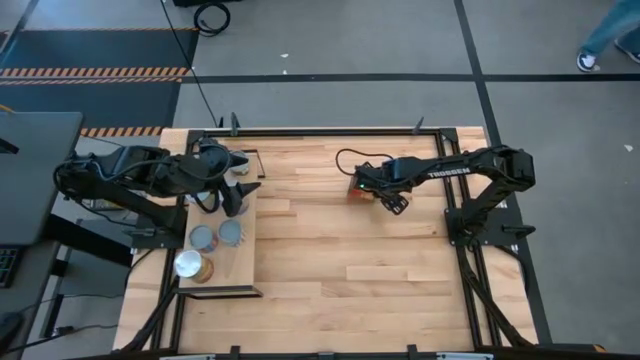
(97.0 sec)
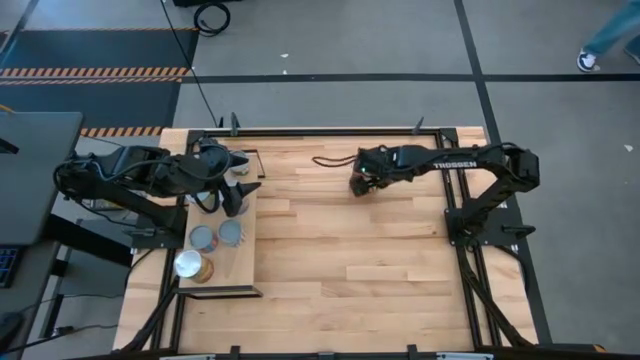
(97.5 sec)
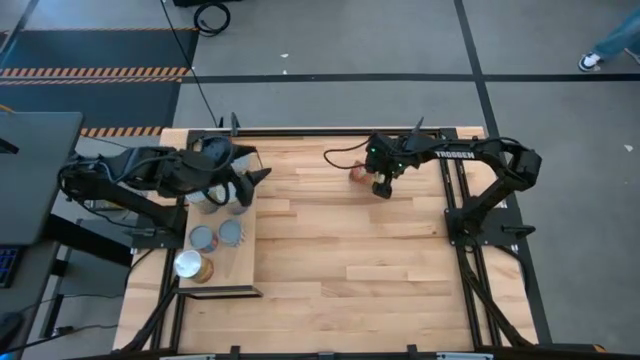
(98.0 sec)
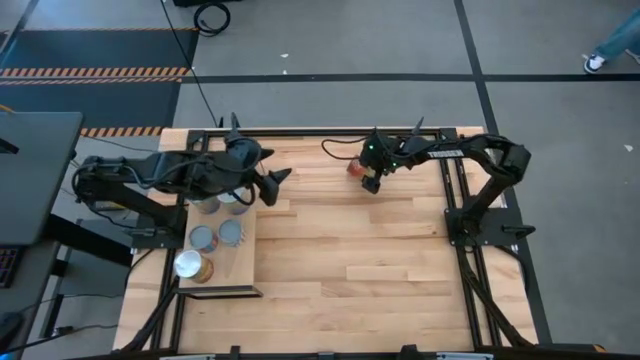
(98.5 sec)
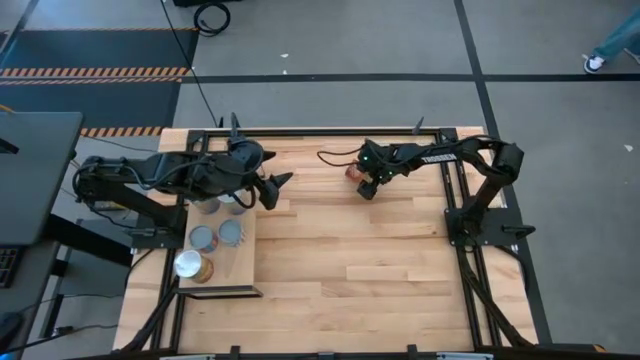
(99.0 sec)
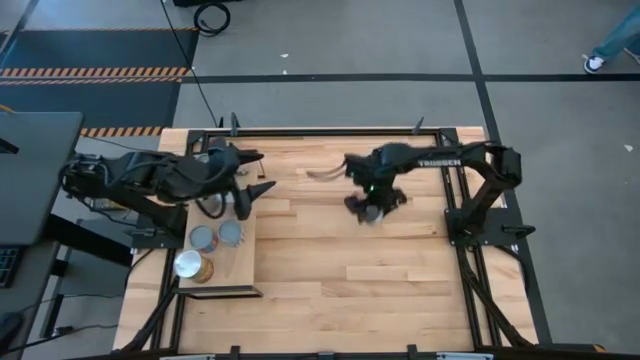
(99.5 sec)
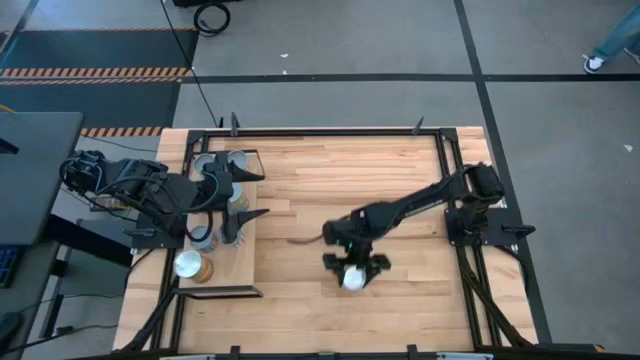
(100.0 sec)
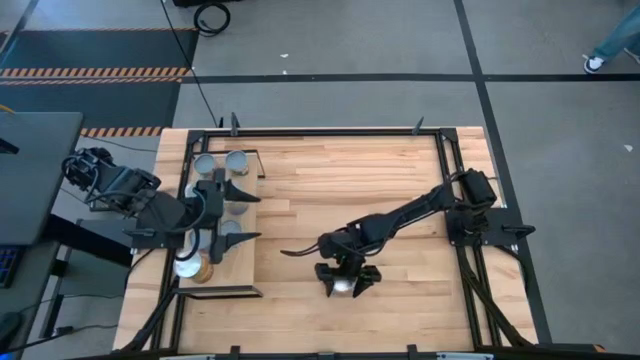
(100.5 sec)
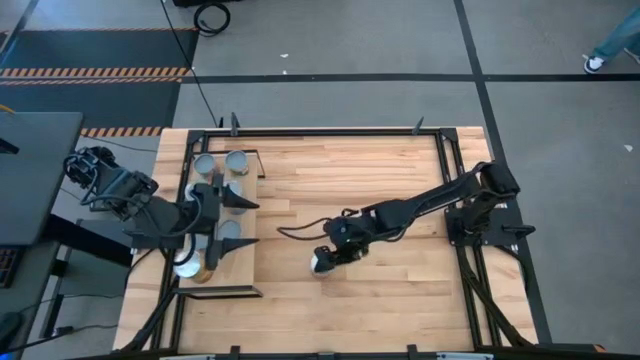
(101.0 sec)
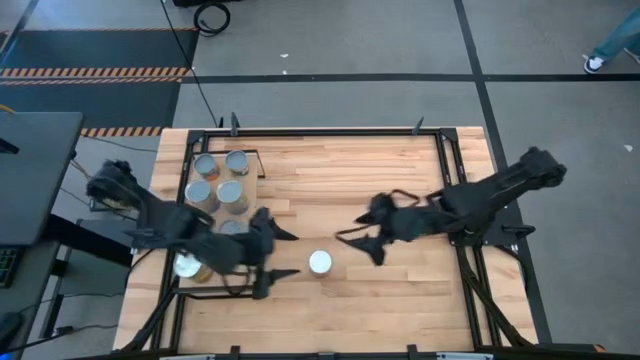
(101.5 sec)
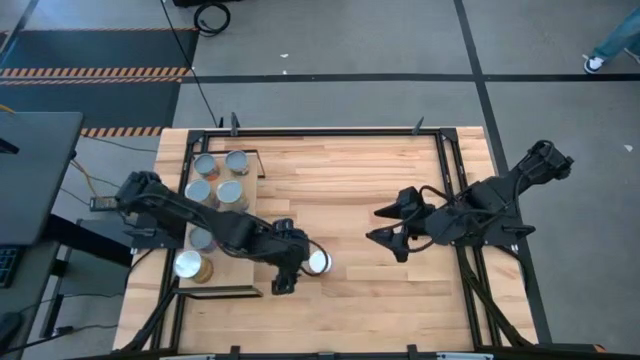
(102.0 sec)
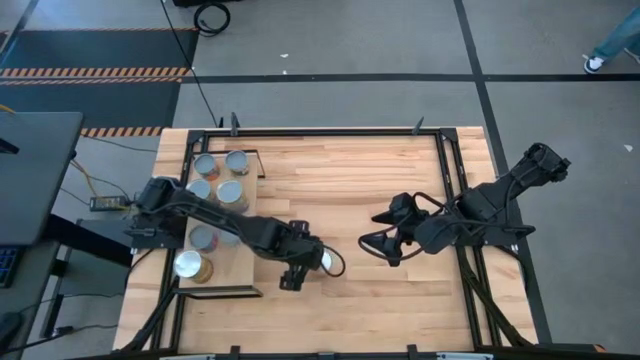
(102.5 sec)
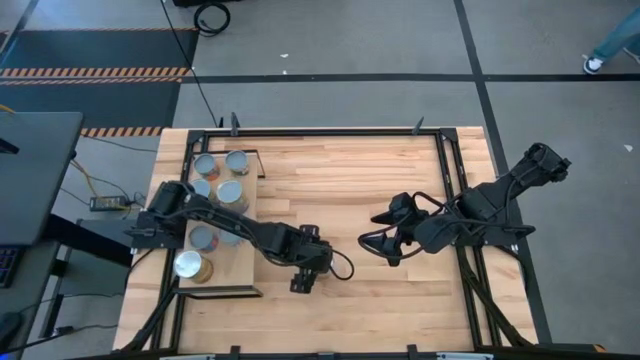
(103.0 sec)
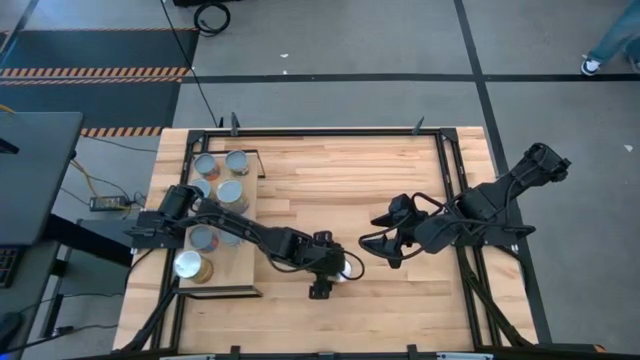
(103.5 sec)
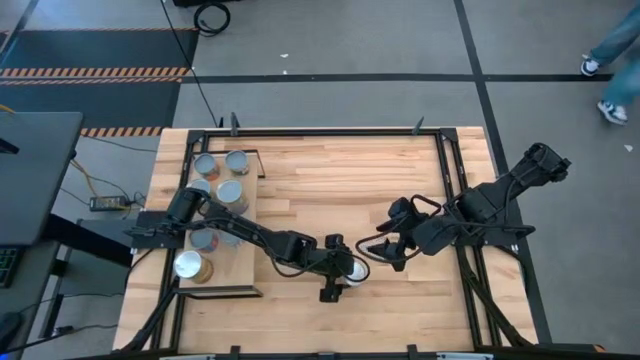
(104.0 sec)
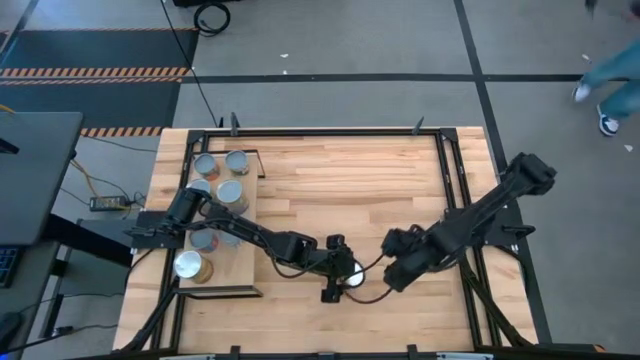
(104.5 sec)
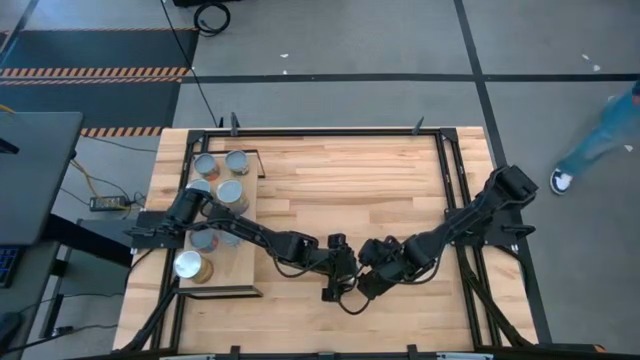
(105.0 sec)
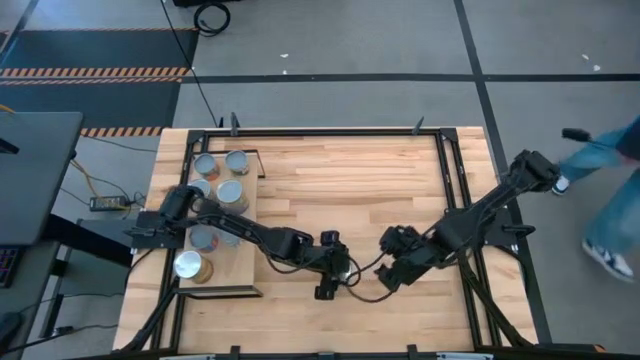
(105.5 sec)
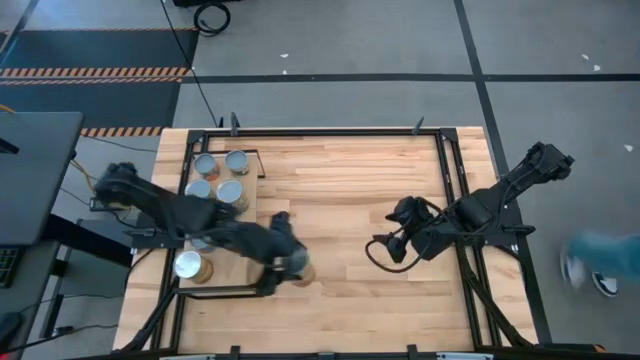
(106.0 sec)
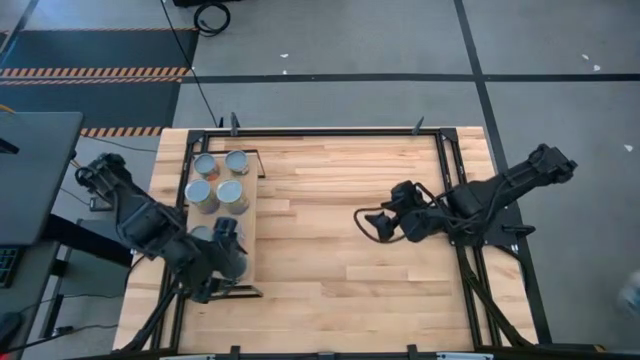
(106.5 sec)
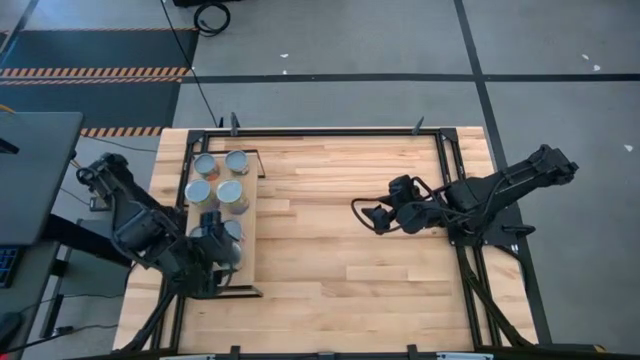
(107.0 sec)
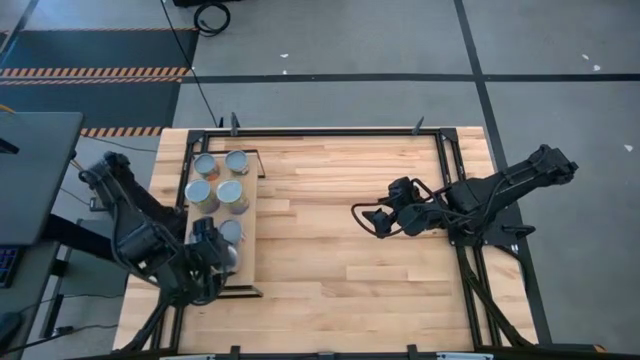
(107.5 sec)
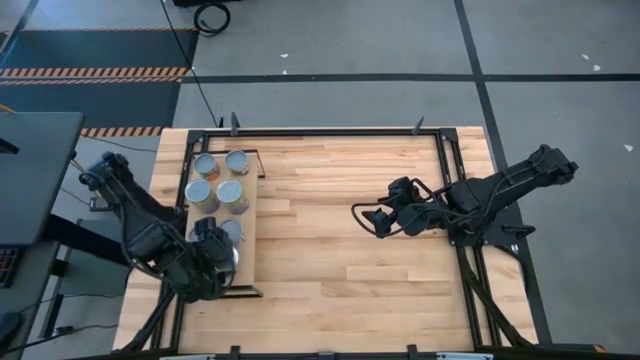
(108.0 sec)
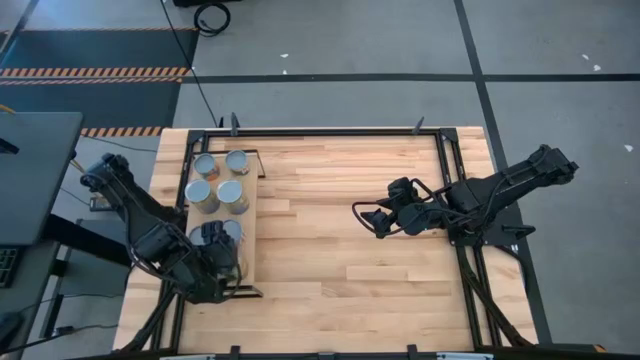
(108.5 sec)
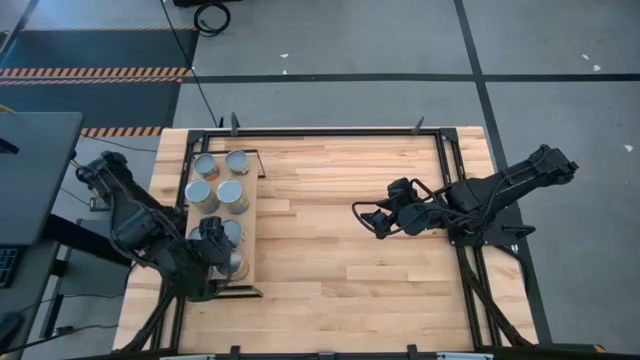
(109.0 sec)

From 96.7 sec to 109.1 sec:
Task: Pick and place cans onto a shelf
Put the canned corn on the shelf aligned with the other canned corn

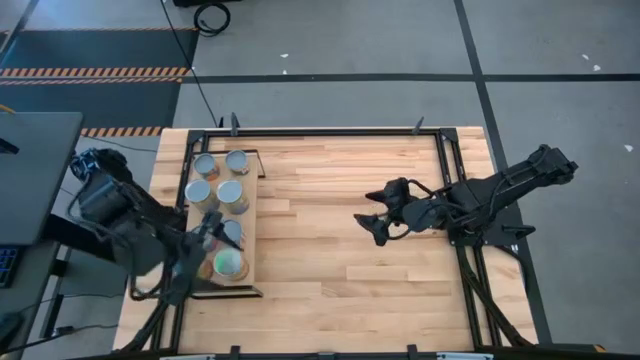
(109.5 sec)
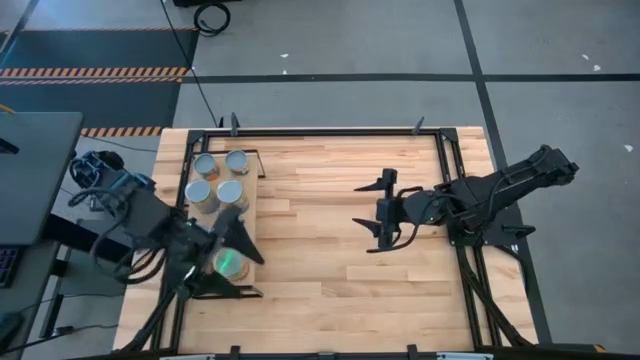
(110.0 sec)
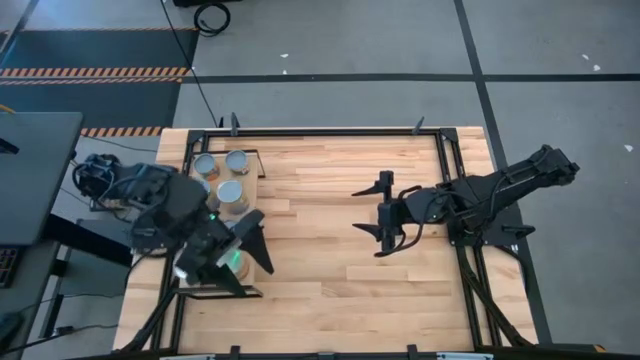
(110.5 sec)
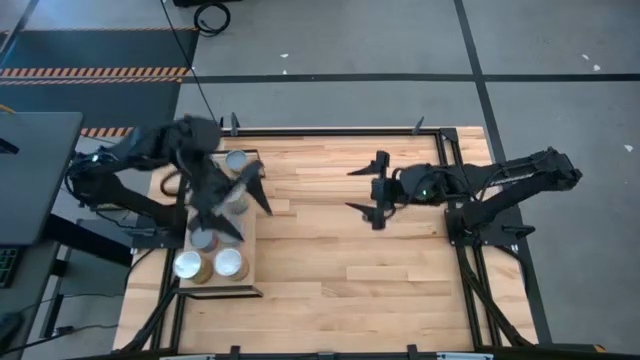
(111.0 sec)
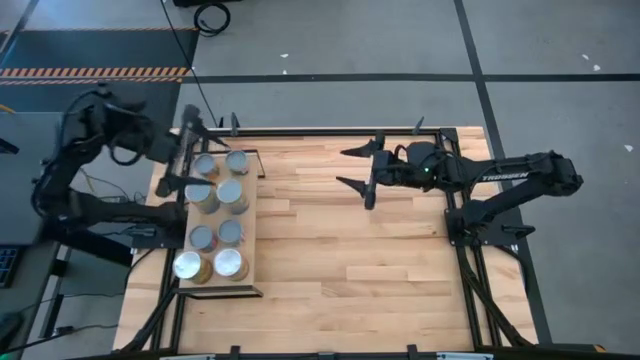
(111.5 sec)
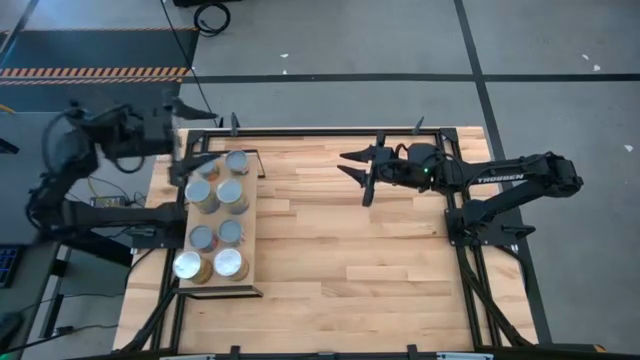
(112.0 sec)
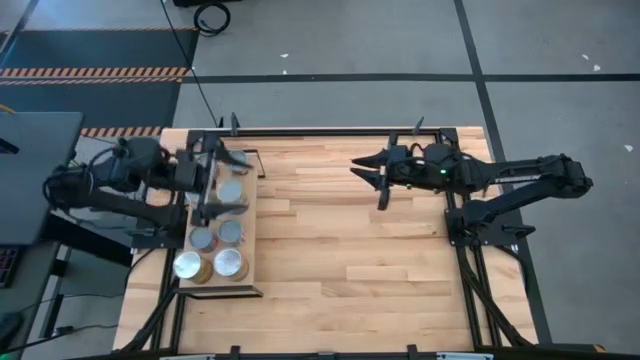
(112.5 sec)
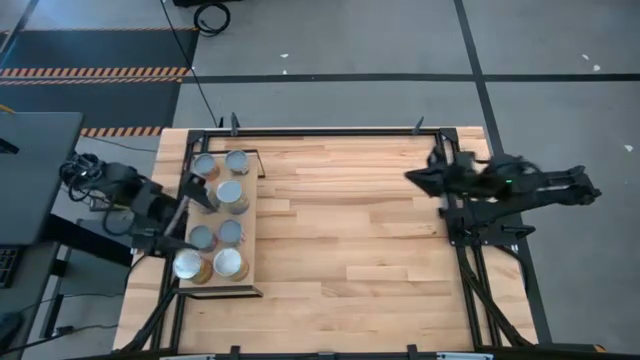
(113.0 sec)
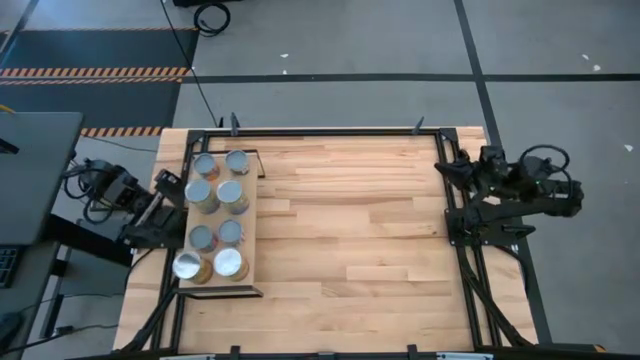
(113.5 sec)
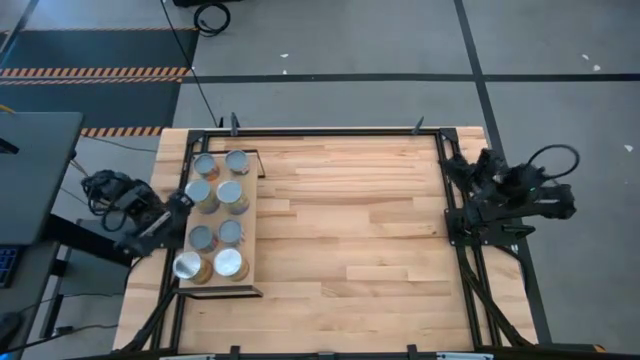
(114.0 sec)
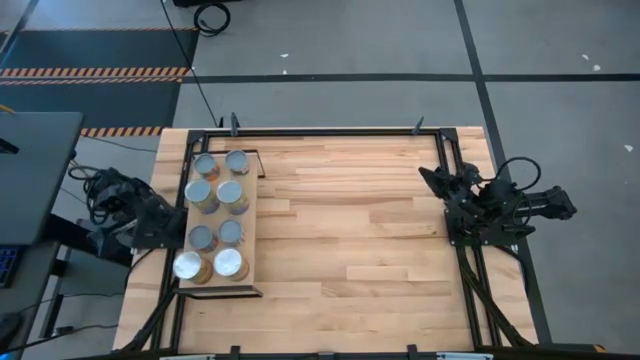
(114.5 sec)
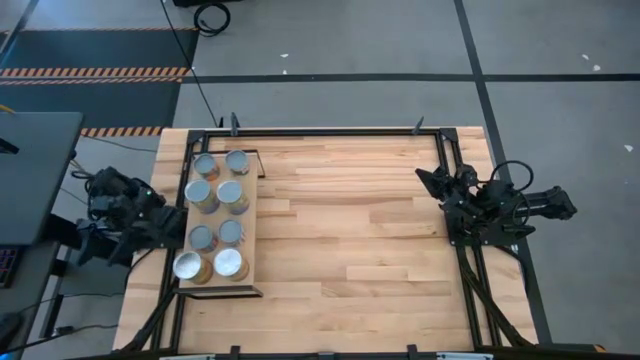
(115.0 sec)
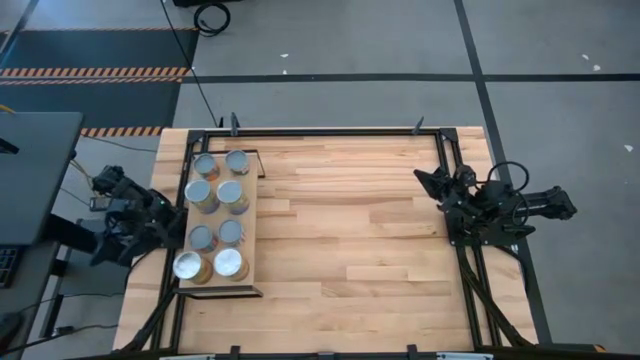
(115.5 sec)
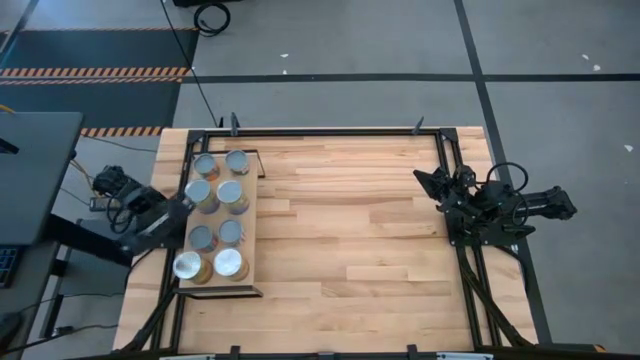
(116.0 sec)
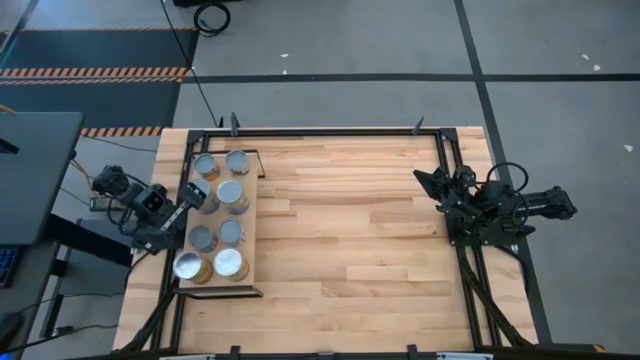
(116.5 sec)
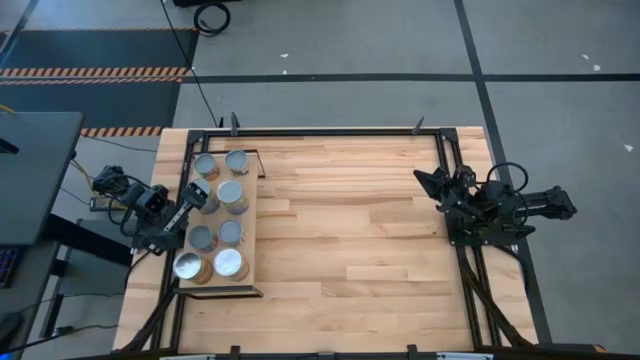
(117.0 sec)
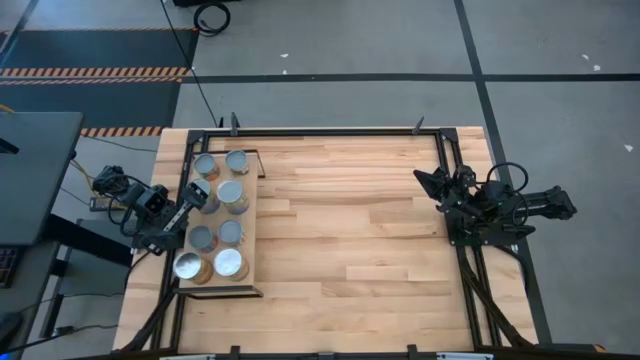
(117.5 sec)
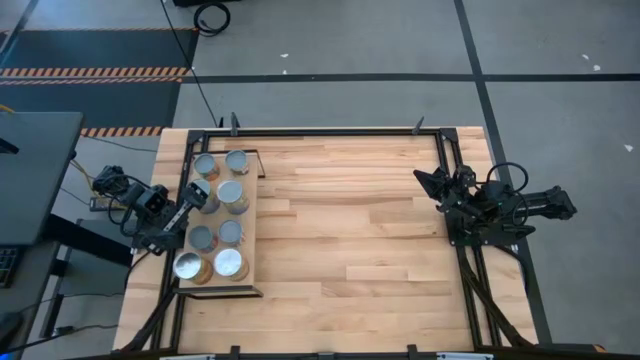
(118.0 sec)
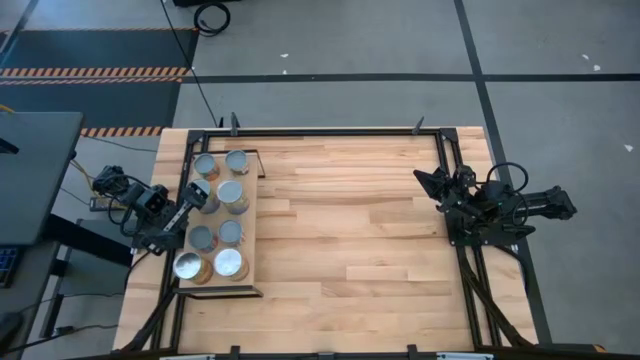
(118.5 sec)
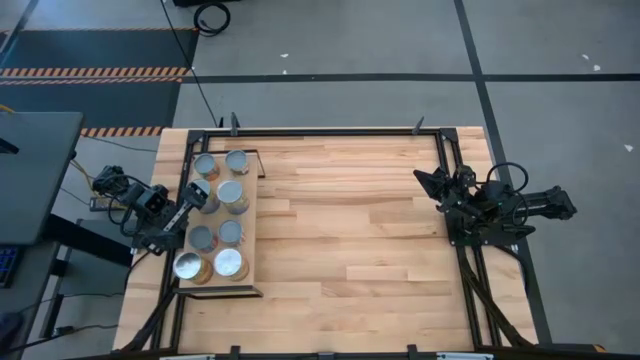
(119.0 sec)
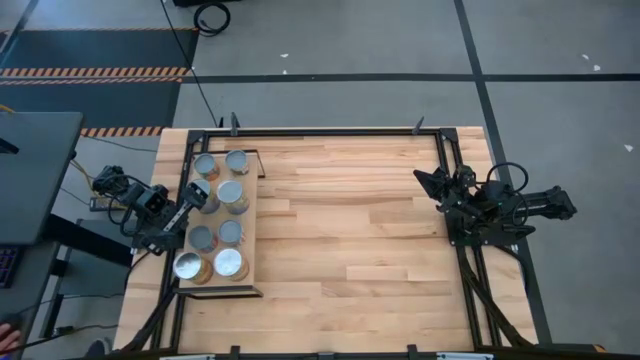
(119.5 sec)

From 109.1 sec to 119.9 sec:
Return to Home Position
